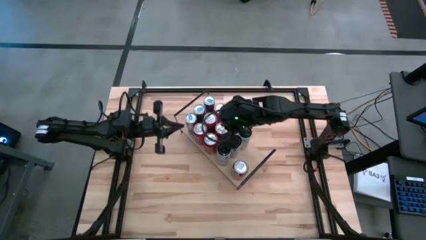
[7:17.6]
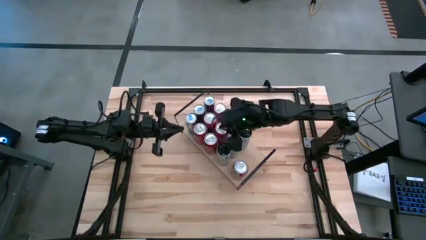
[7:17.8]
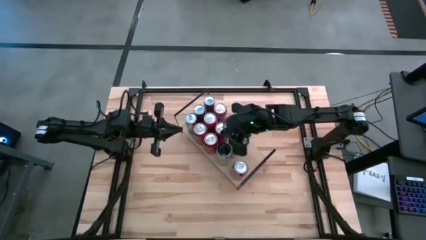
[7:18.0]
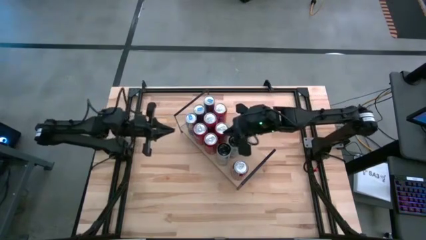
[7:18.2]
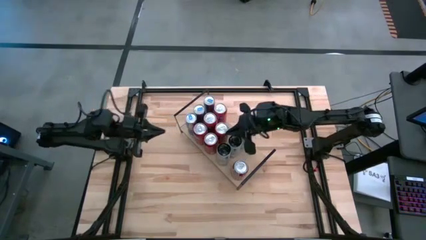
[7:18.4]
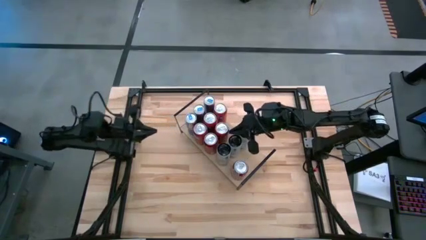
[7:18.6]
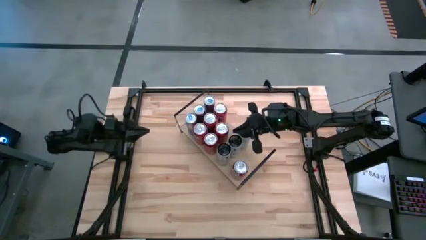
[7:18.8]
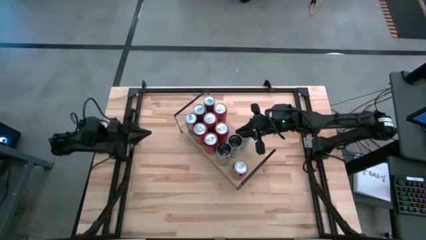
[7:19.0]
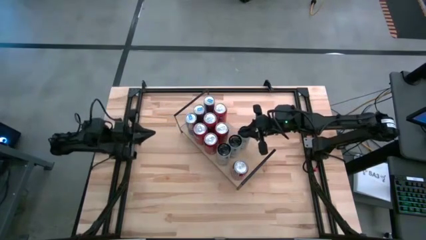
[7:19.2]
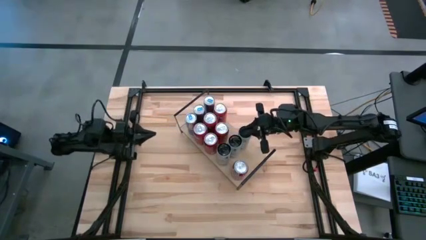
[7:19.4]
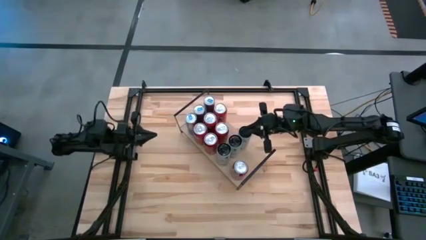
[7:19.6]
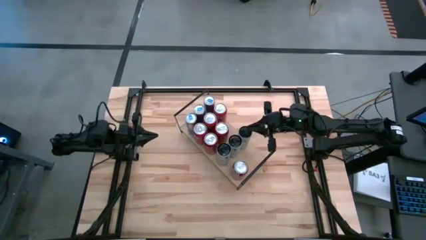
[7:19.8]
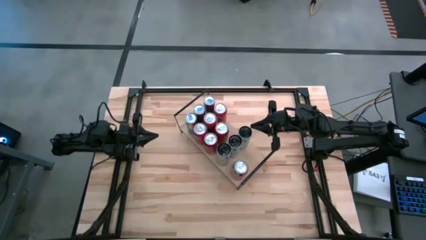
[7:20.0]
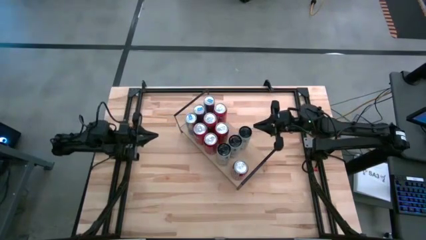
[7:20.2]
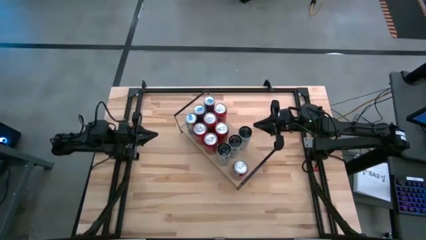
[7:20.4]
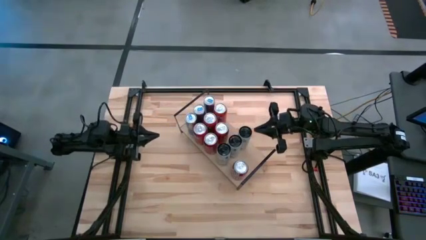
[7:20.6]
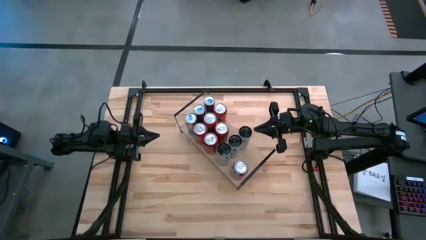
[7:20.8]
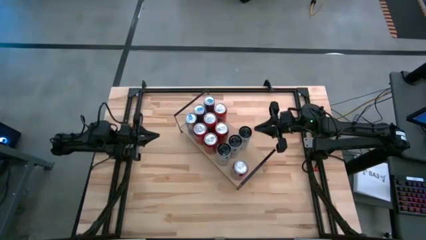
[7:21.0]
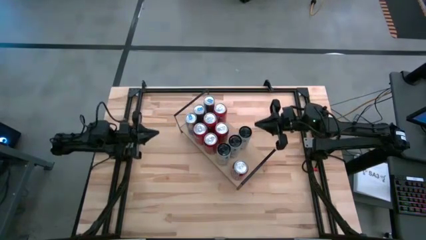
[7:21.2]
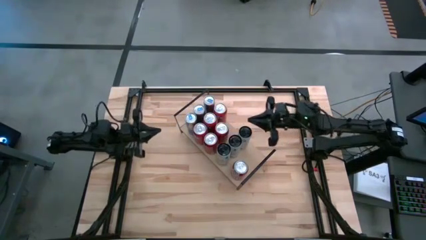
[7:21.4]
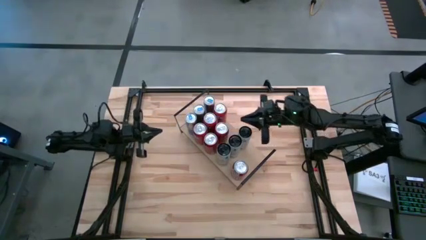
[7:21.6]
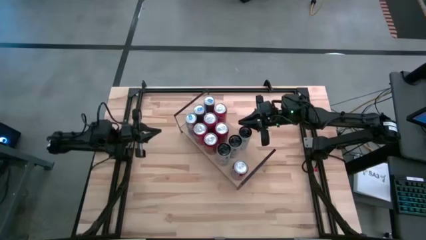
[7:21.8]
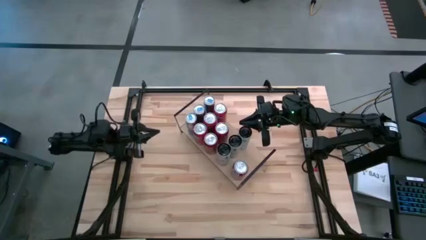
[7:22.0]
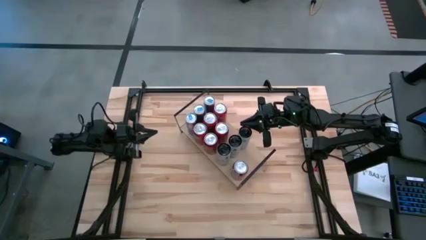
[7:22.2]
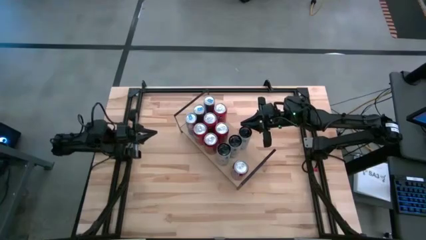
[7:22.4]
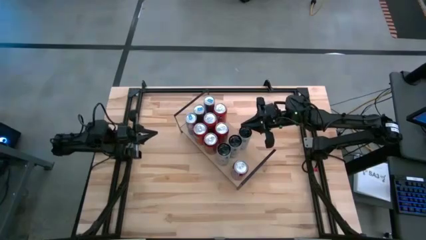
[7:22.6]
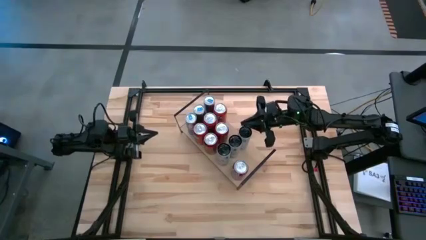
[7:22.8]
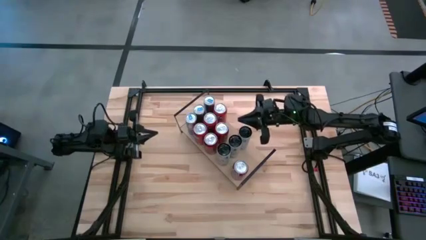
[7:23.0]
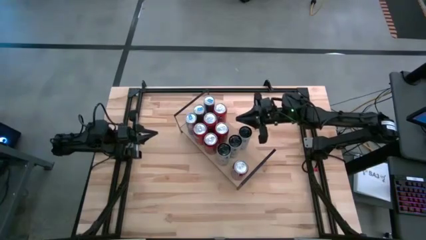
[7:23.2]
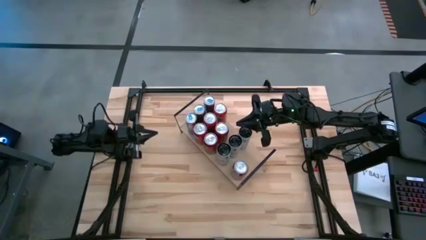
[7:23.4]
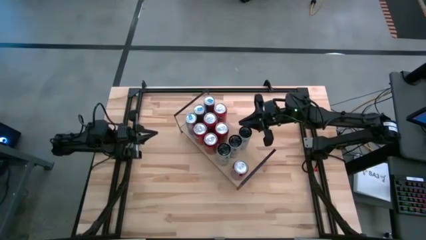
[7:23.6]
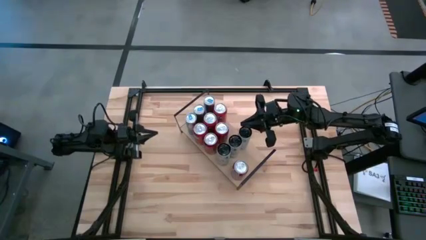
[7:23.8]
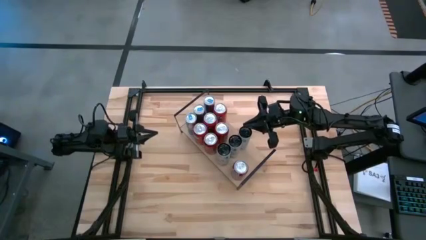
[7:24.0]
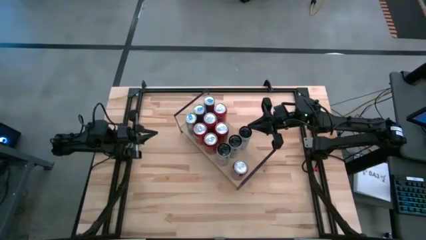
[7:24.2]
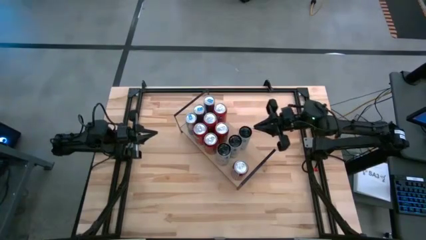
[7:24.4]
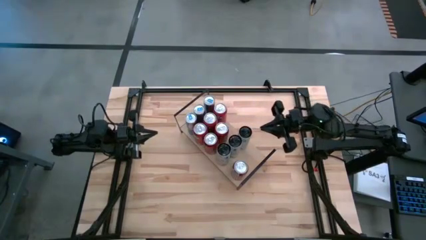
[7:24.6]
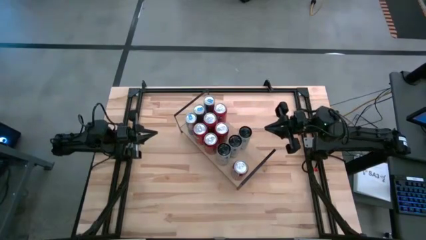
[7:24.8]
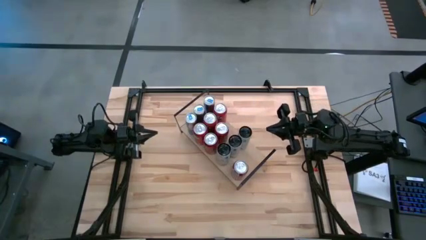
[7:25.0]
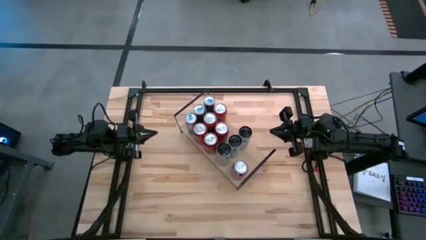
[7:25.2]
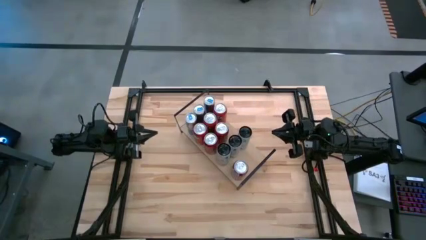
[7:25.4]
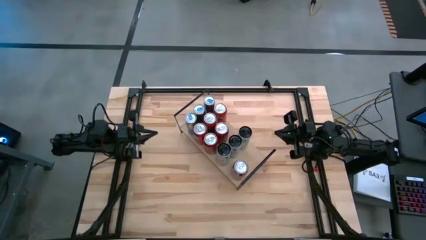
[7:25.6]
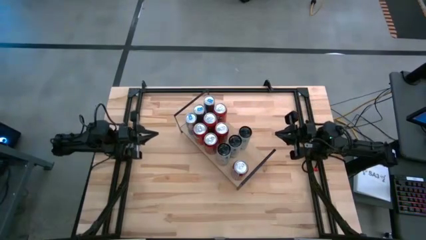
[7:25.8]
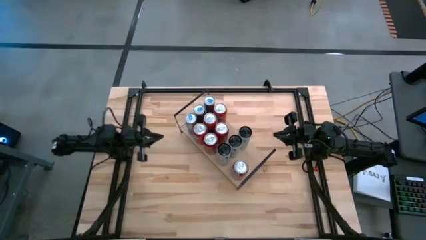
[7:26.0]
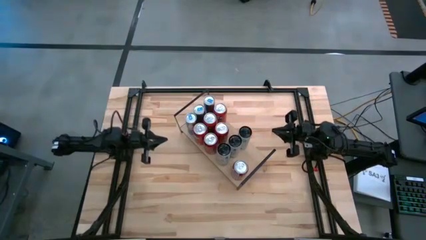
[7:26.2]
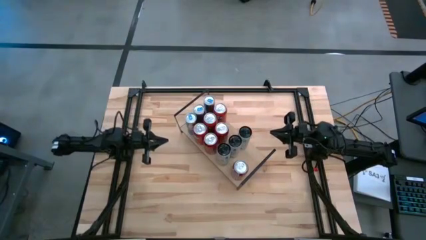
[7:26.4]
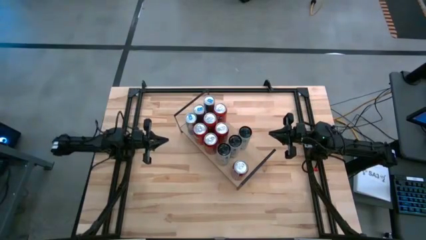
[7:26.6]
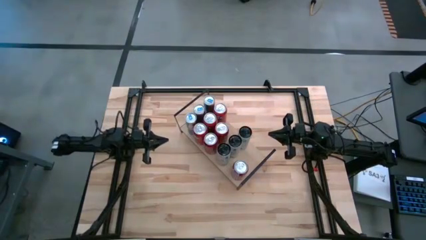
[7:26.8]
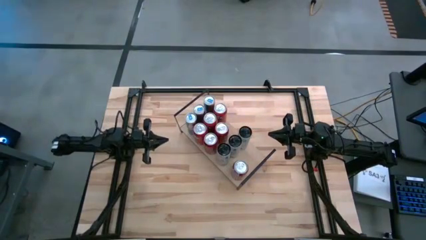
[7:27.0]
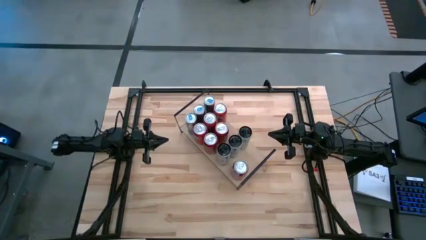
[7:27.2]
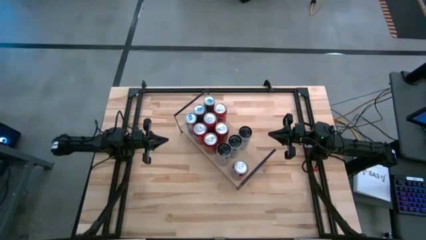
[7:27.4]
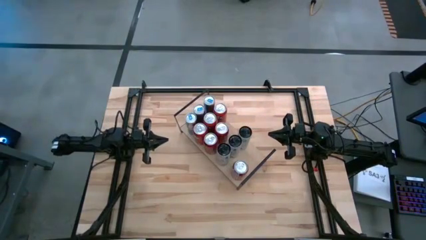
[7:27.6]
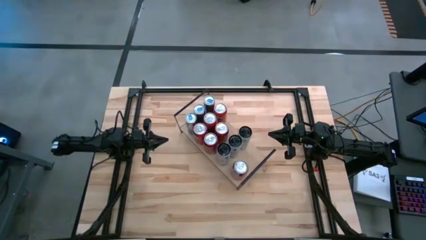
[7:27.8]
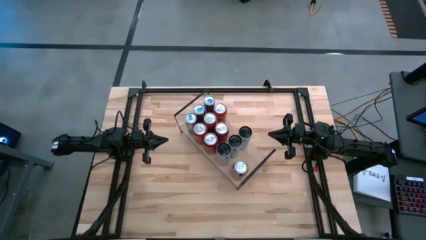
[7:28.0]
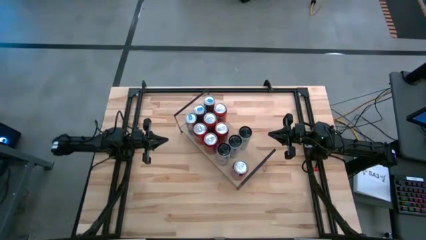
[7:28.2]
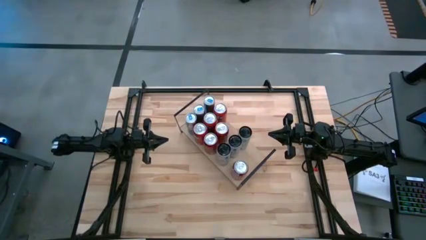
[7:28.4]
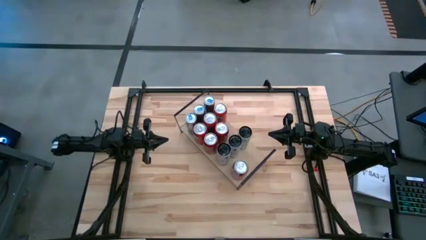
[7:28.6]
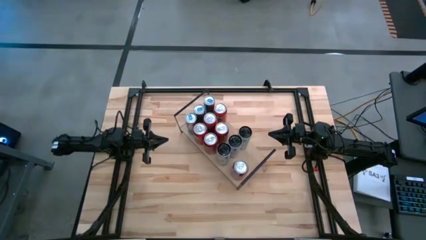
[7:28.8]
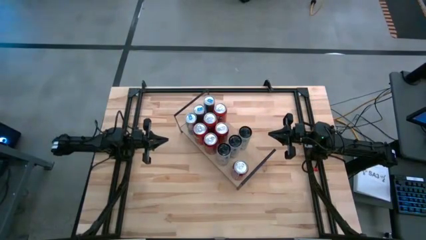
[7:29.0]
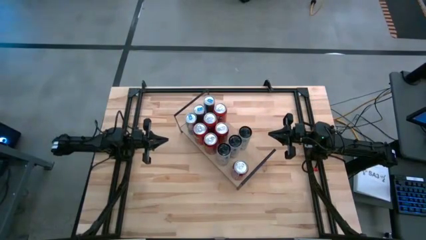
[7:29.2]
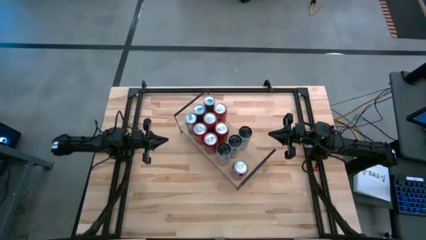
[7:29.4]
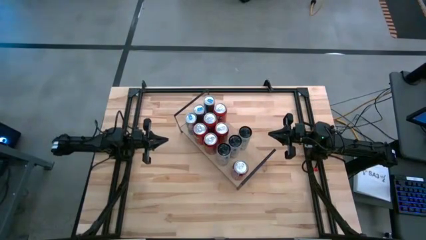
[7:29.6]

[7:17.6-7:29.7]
Task: Place canned beverage on shelf
Return to Home Position

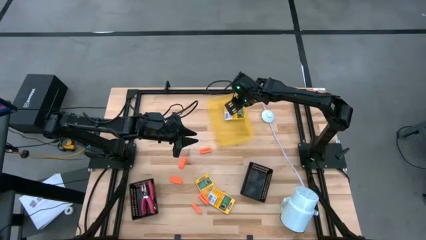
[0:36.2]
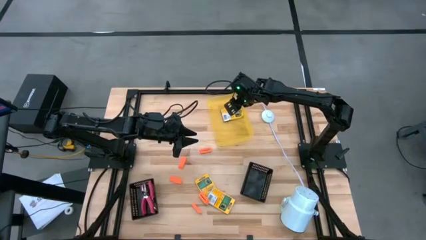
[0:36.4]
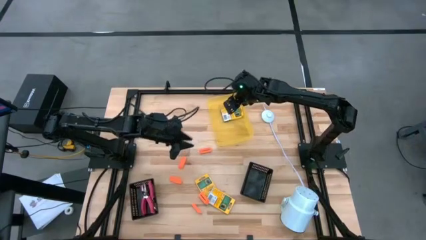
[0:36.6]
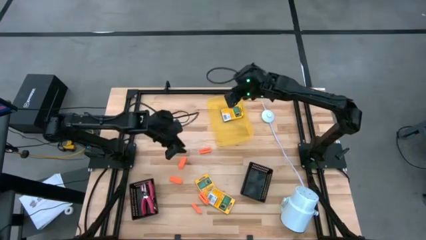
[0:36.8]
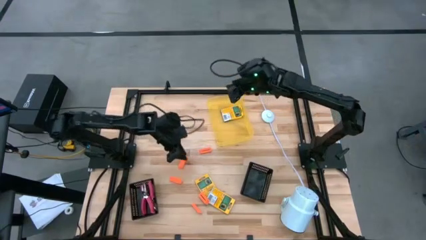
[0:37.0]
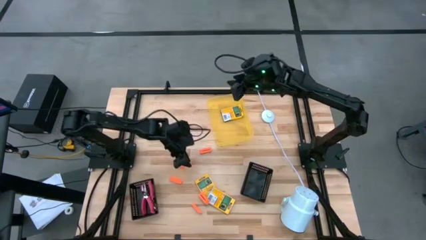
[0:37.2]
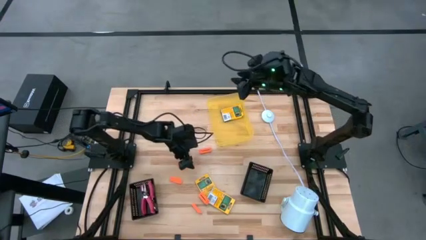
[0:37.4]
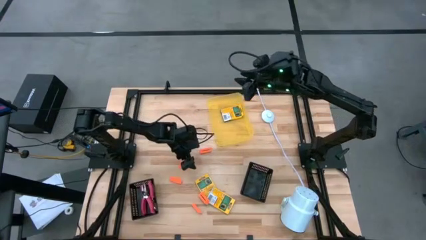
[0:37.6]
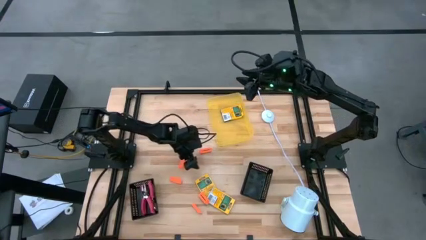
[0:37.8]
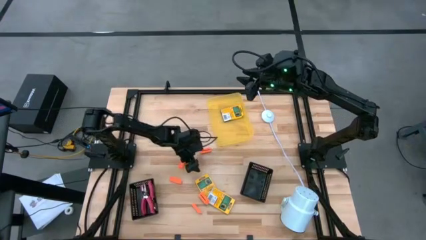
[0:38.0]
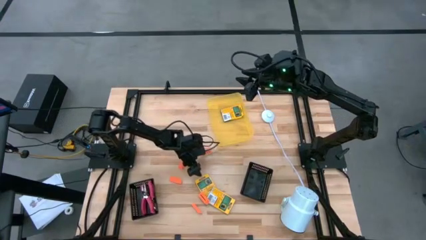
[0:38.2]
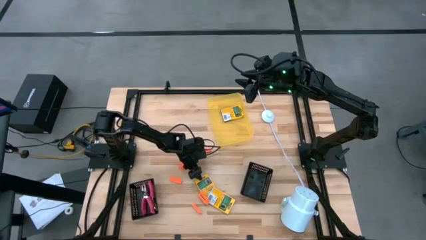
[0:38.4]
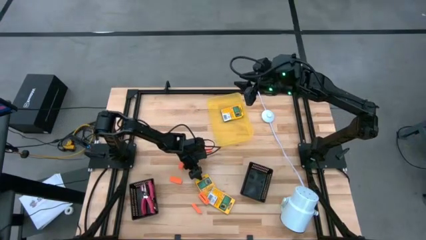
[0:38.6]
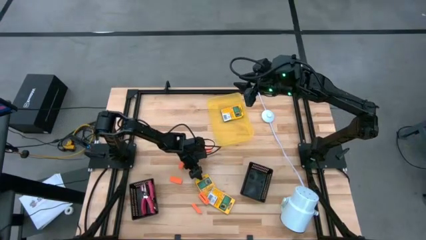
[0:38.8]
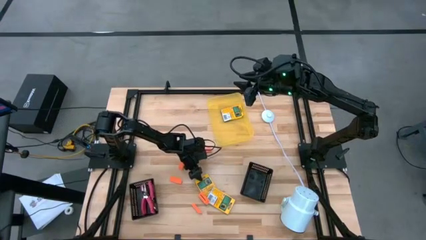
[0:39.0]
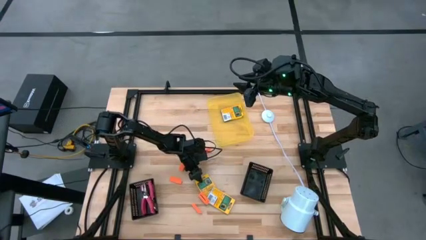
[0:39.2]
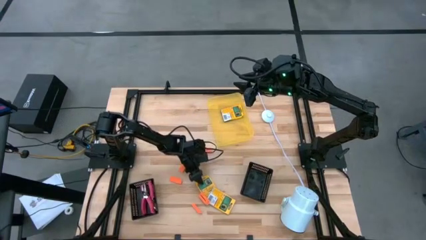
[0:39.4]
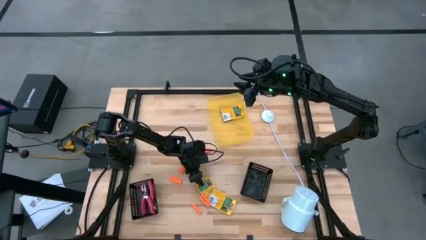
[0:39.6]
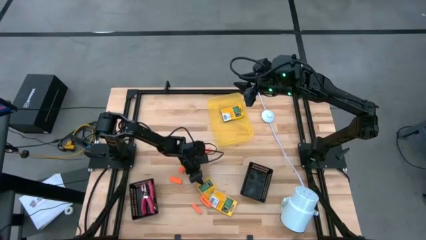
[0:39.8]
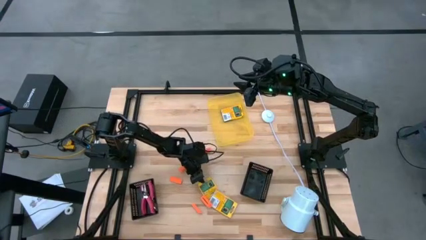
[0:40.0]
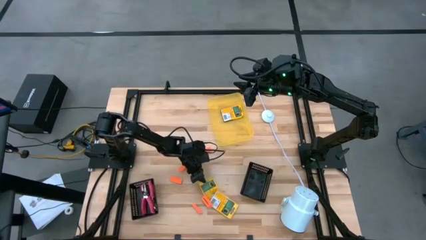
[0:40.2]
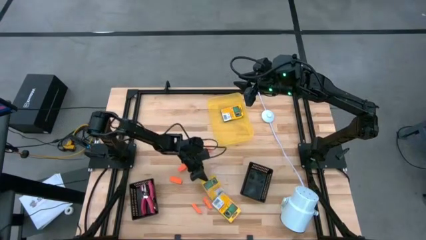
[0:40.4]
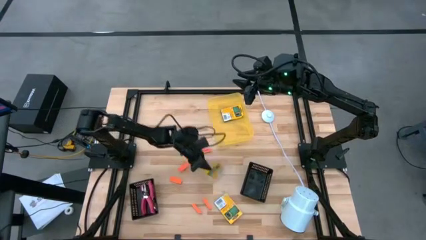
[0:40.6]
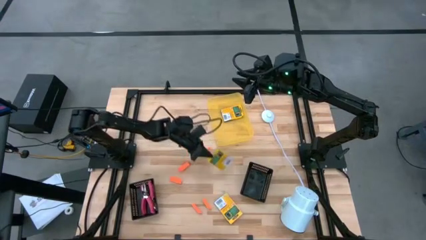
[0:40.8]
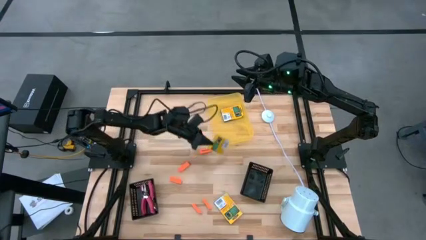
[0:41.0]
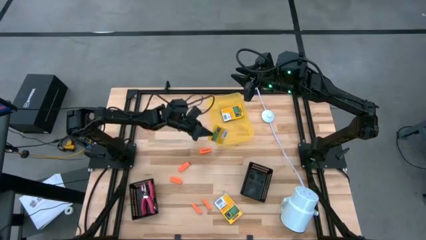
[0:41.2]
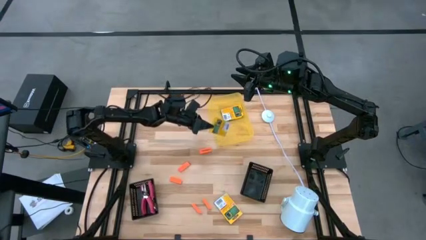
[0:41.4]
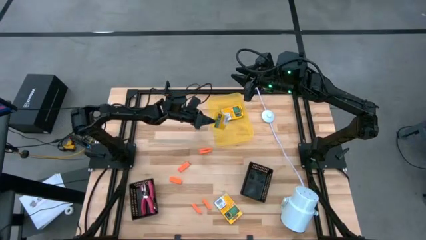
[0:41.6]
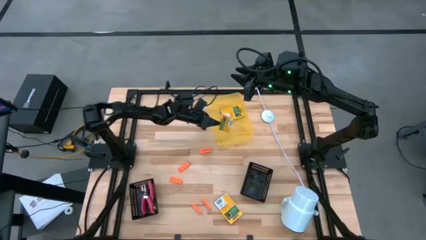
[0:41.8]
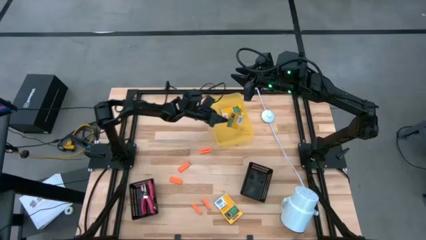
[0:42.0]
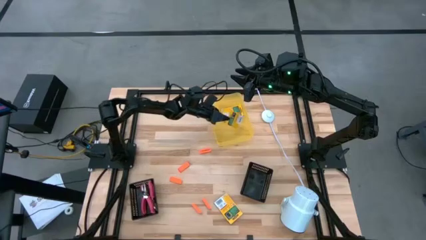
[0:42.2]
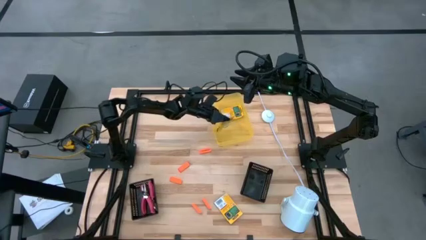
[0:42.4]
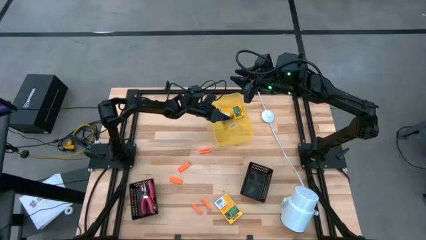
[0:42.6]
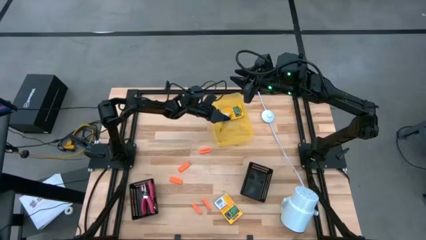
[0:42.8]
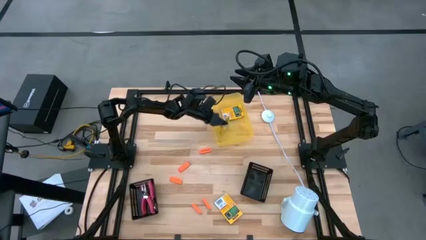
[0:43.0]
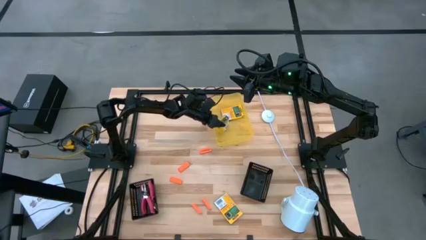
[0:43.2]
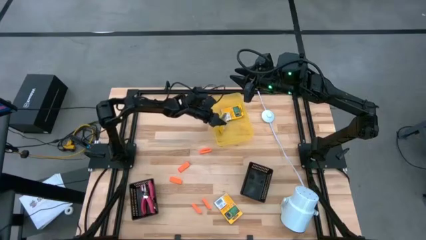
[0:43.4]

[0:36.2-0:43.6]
Task: Pick & Place School Supplies
Put the yellow crayon box into the yellow bin
